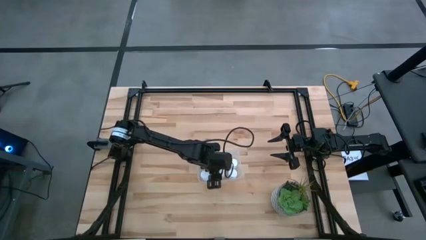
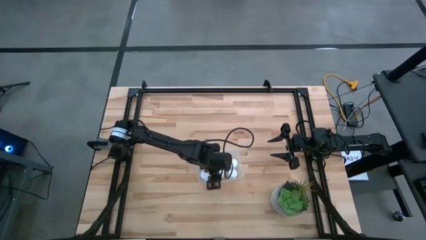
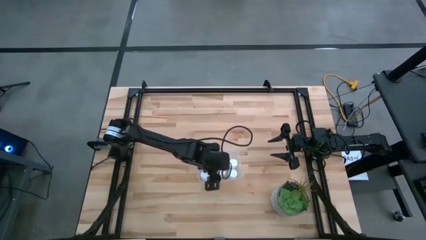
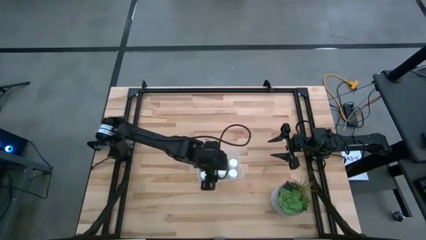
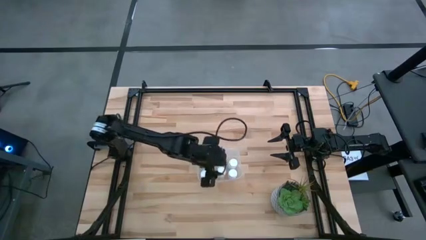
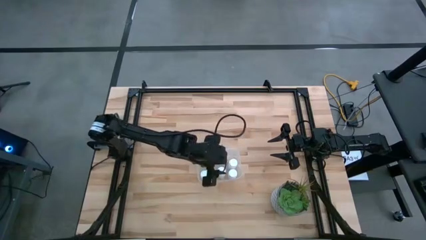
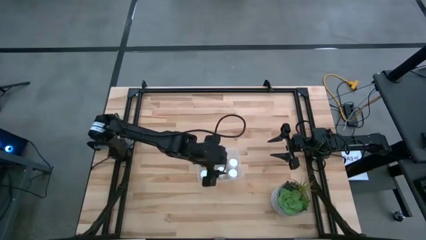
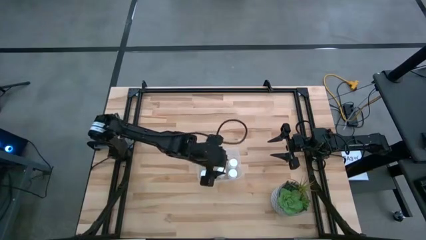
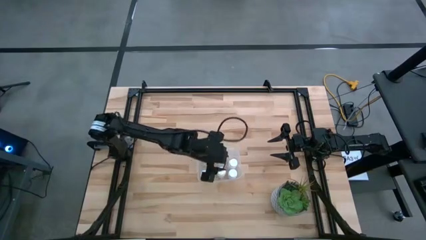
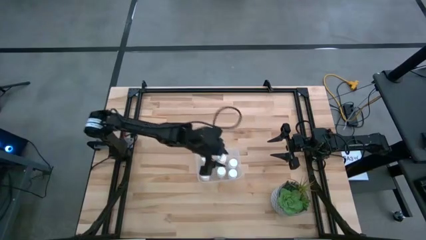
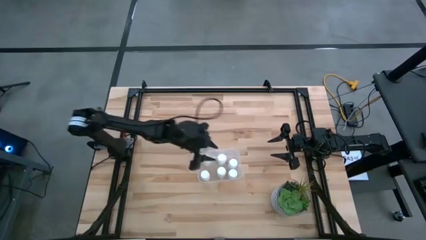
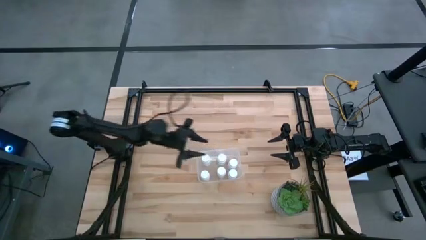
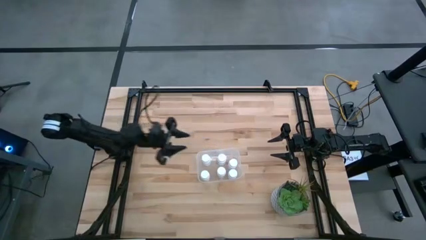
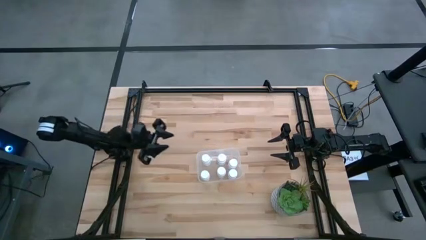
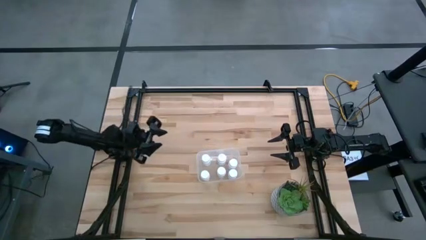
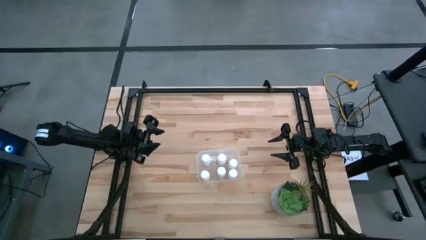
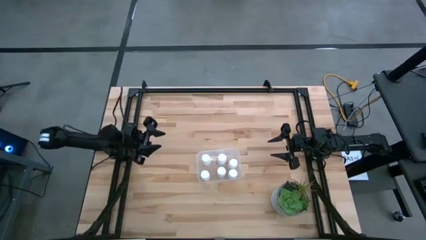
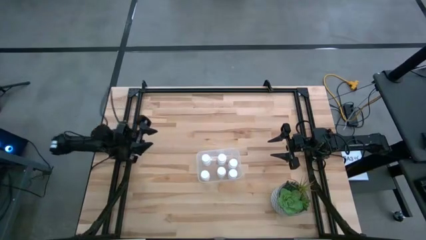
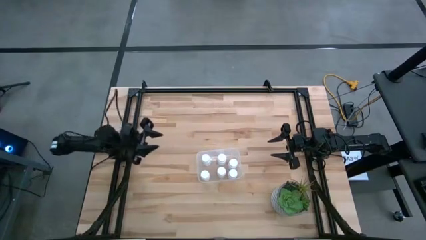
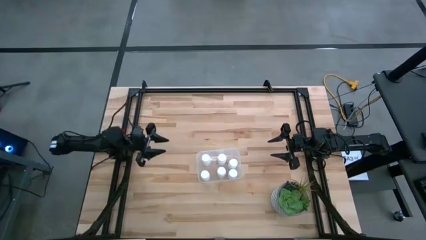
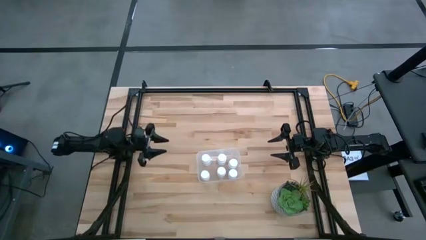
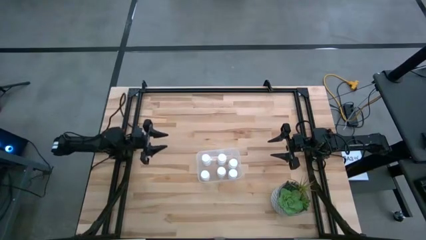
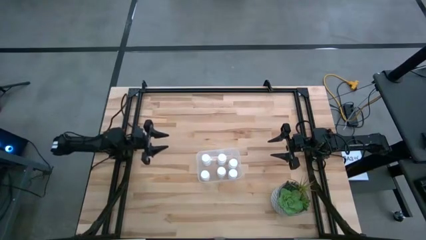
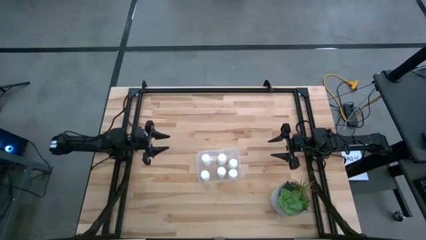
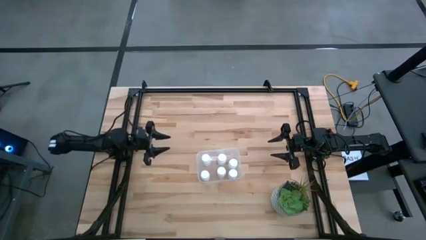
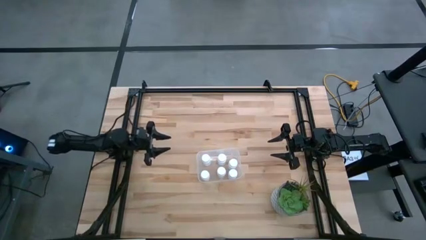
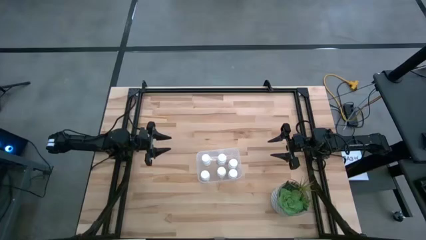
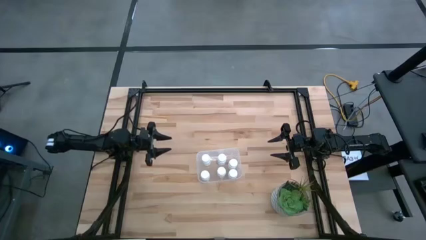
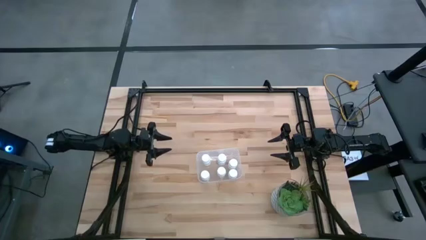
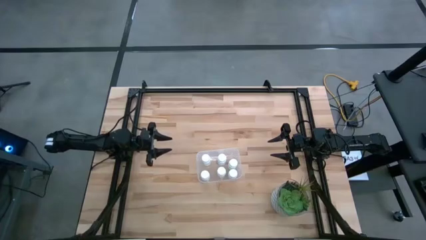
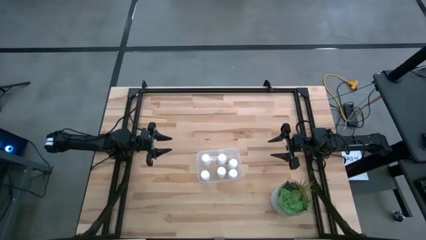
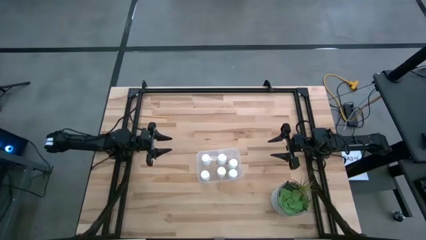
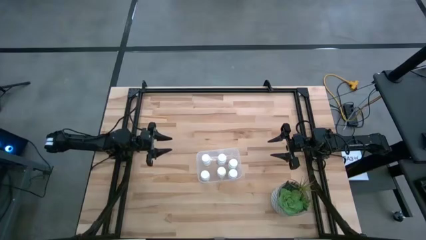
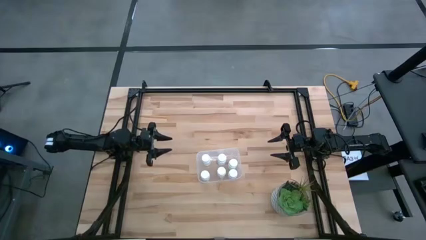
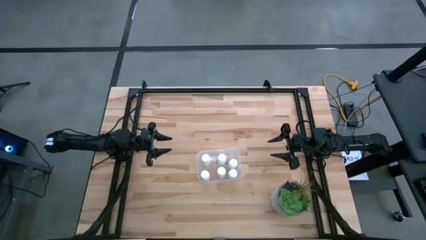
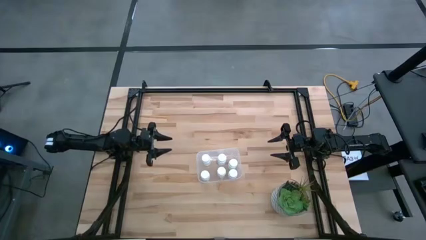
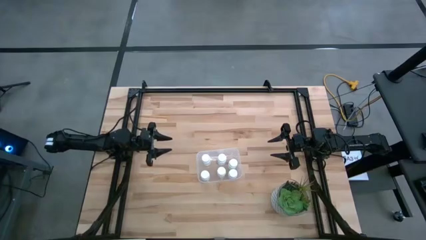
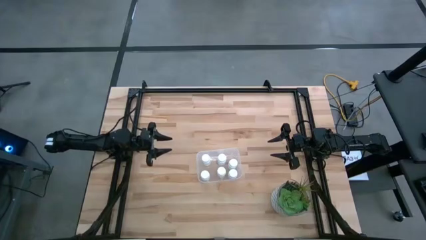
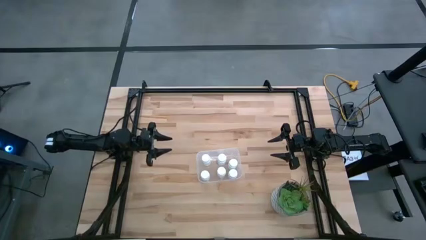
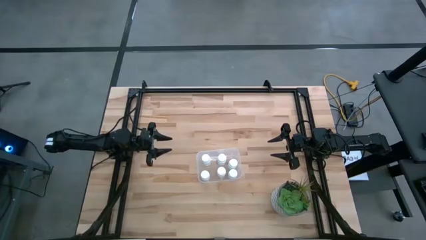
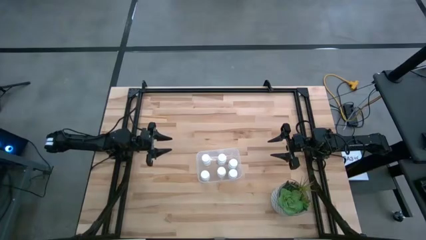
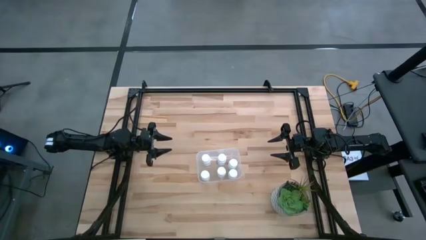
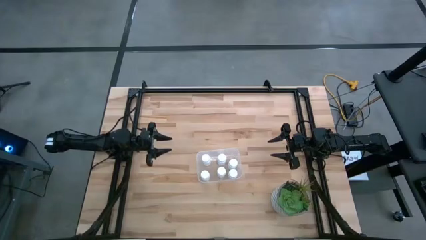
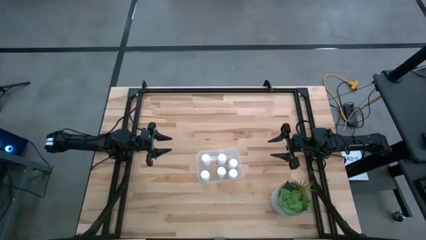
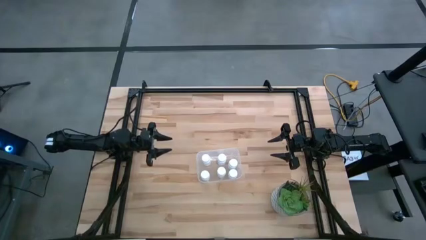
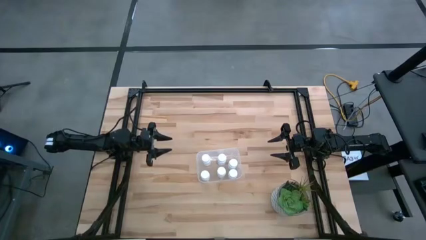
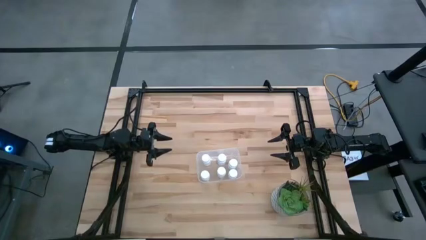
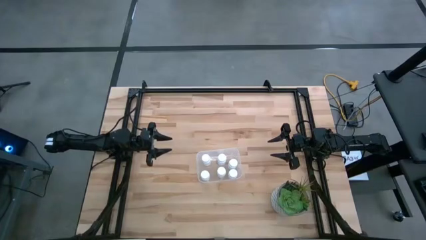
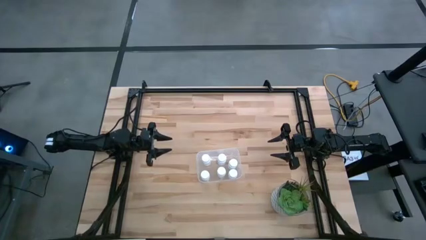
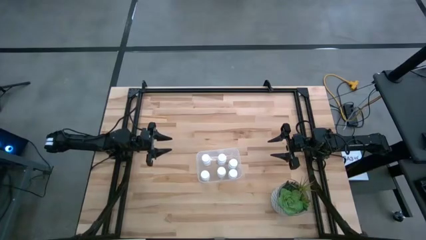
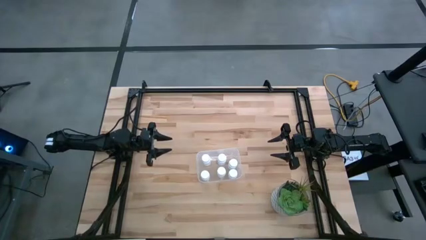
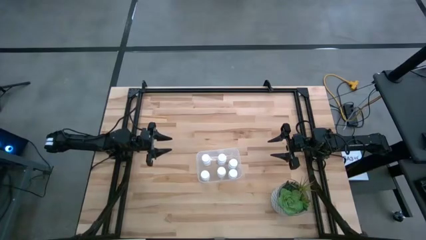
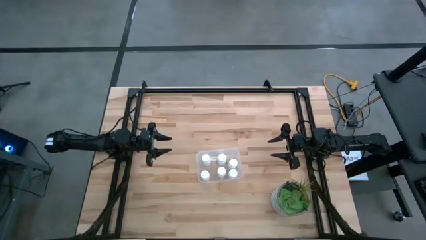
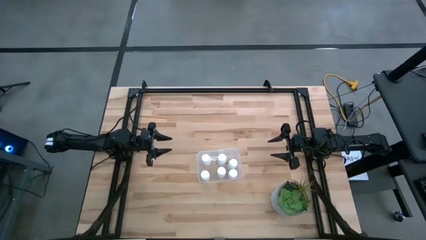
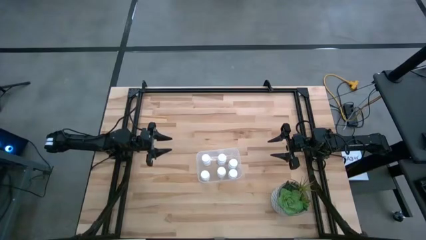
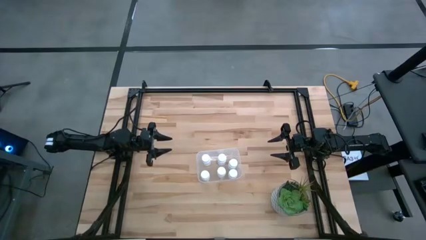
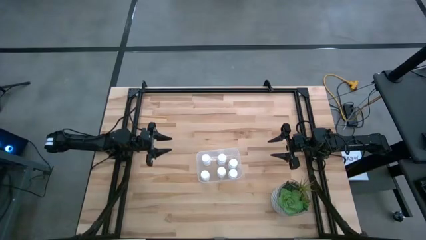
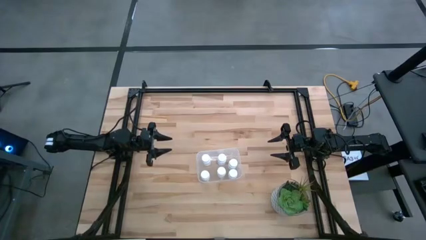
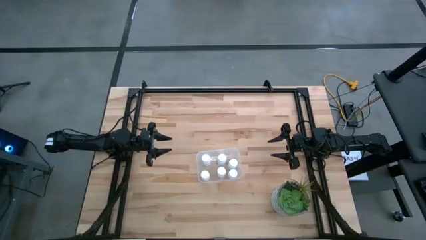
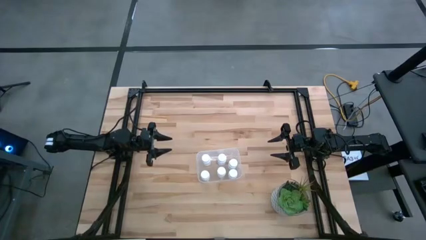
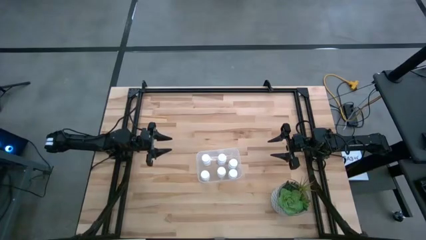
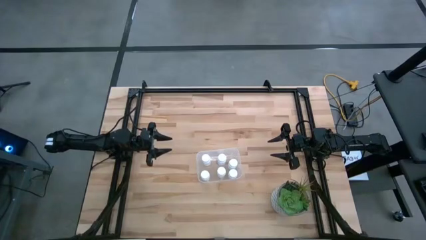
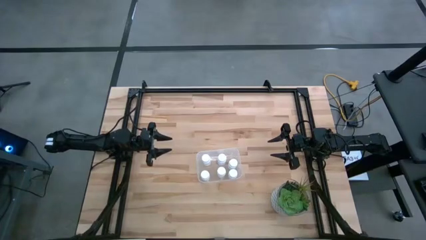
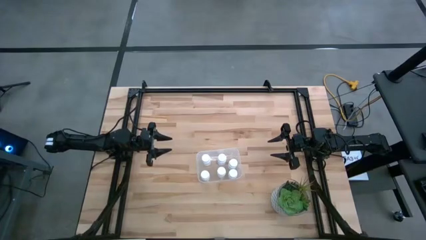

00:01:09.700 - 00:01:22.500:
Task: Pick and place pill bottles into a basket
Return to Home Position

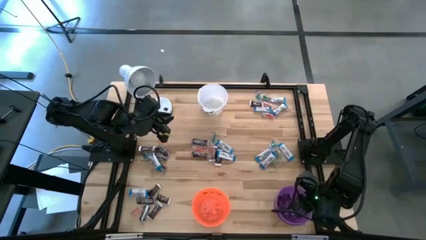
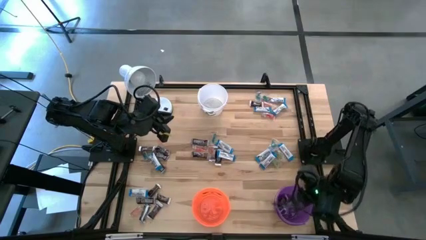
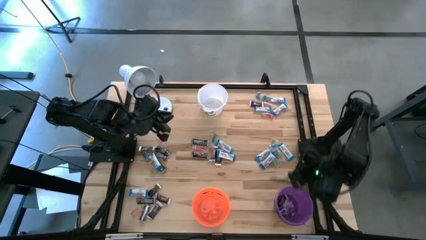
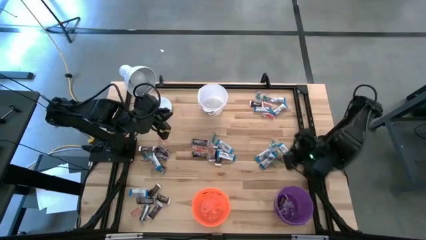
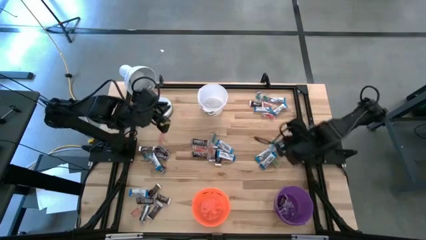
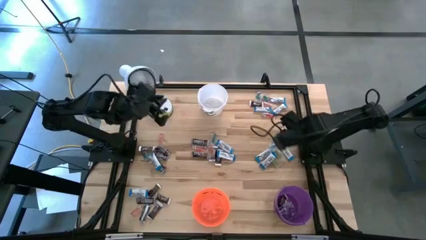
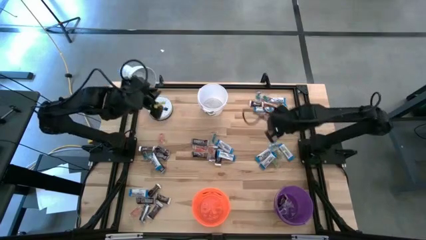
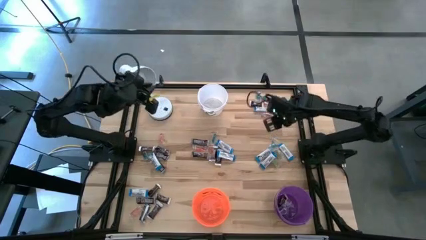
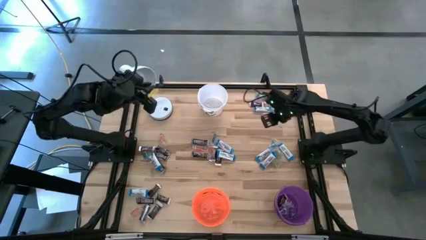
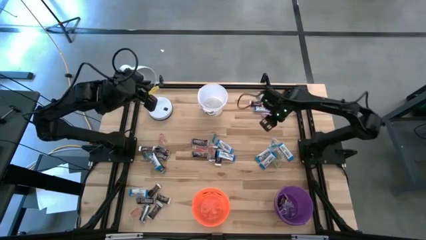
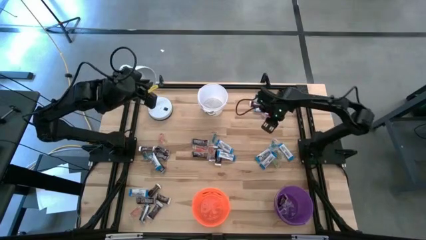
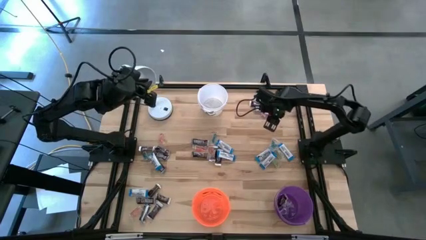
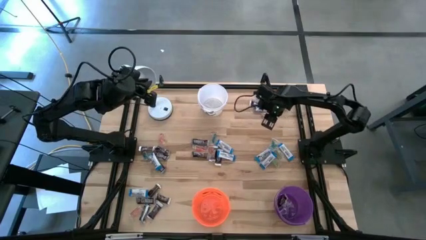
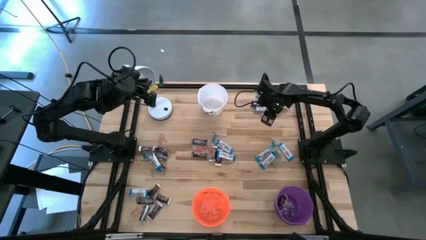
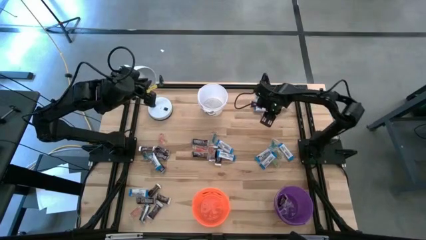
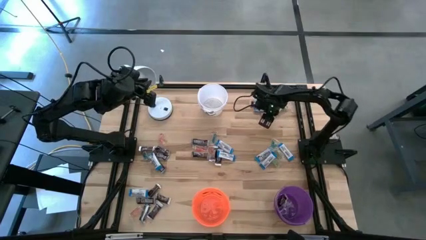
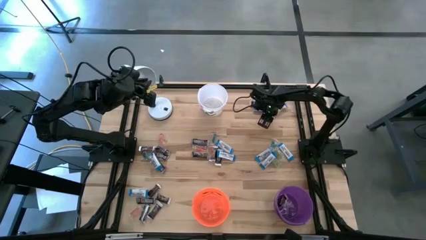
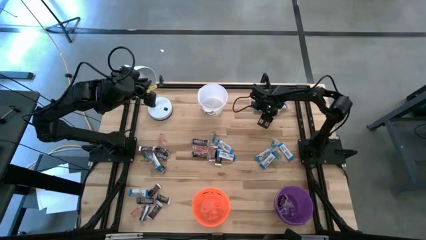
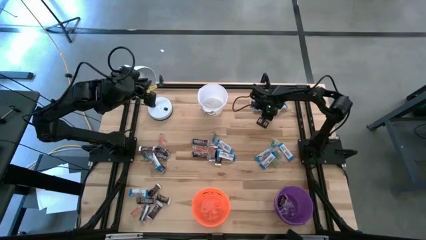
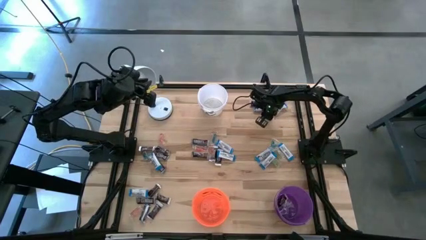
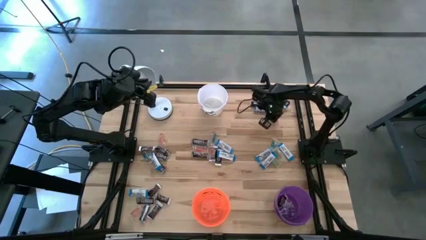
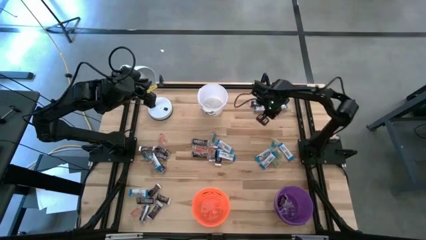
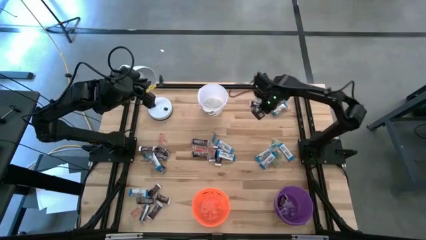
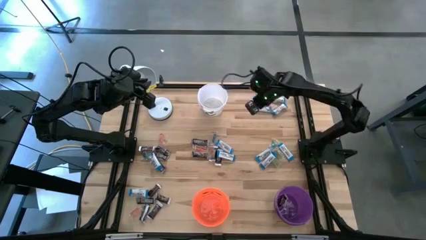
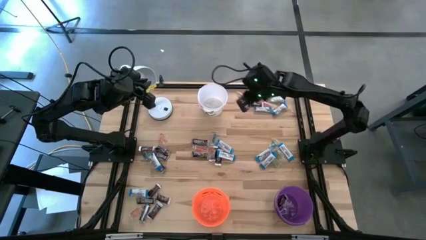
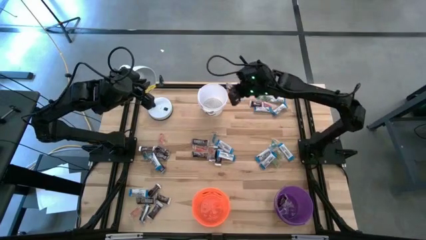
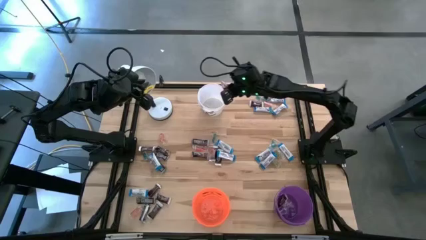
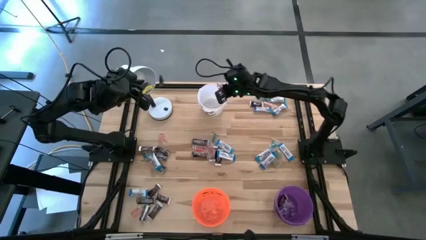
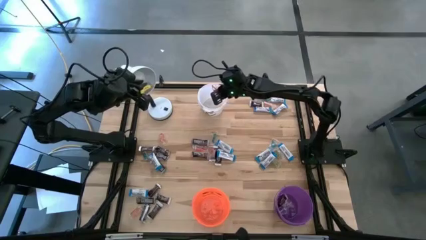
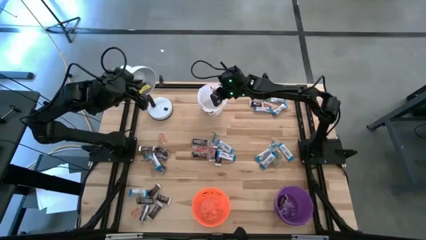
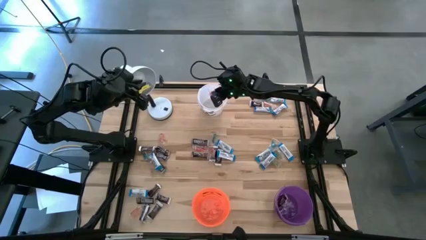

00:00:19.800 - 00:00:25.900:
Task: Organize candy in baskets
Put the orange gummy into the white bucket
